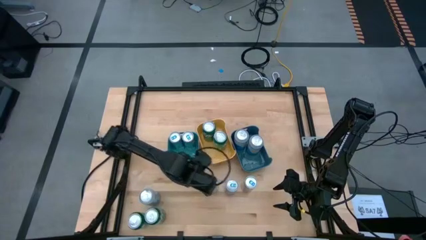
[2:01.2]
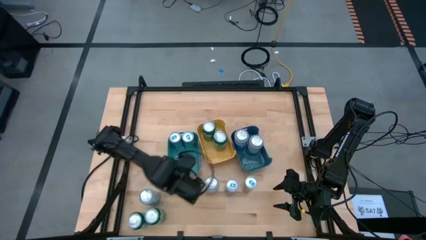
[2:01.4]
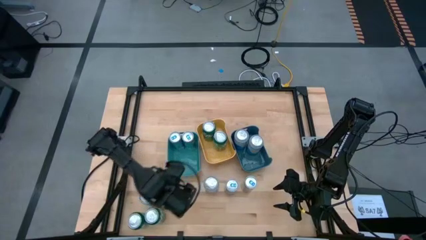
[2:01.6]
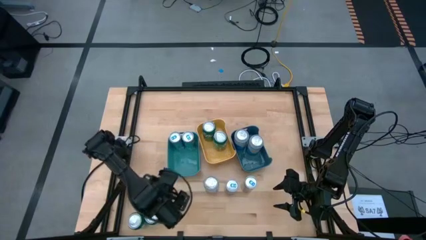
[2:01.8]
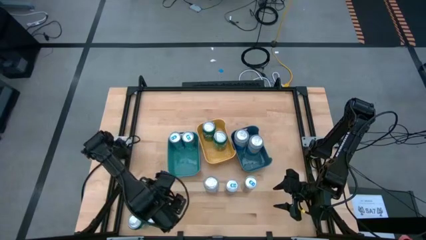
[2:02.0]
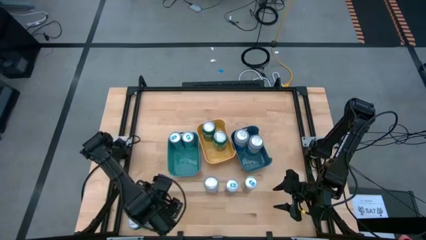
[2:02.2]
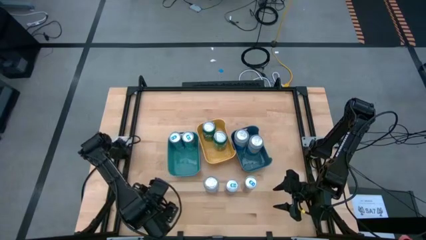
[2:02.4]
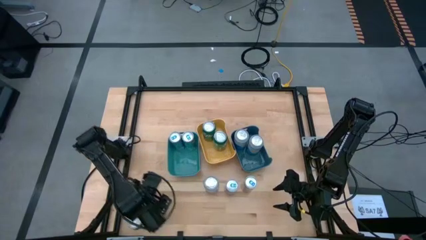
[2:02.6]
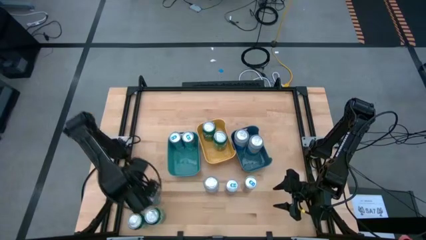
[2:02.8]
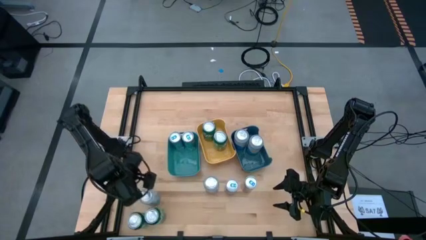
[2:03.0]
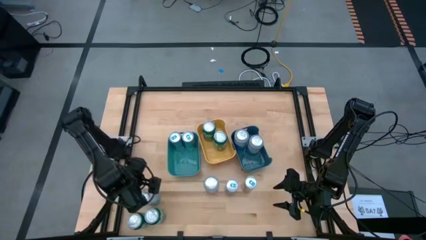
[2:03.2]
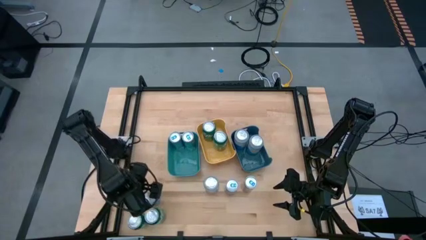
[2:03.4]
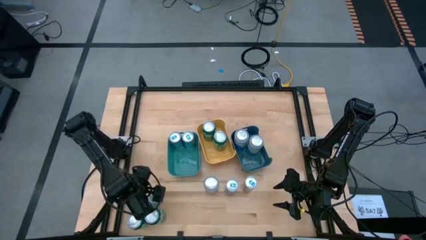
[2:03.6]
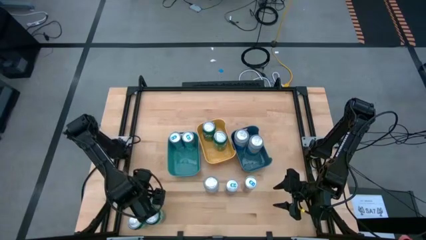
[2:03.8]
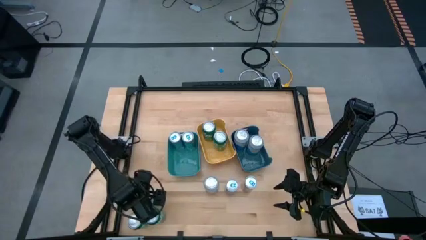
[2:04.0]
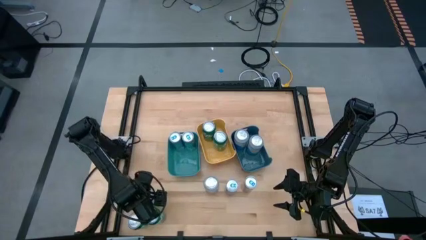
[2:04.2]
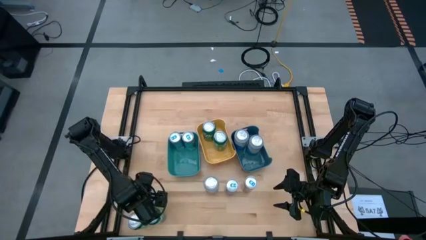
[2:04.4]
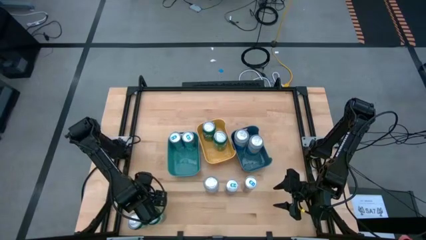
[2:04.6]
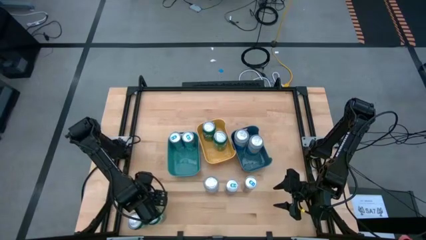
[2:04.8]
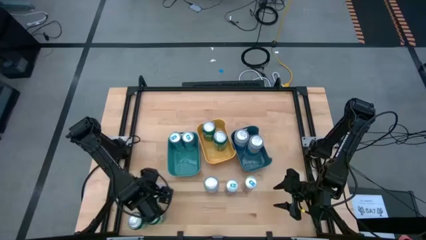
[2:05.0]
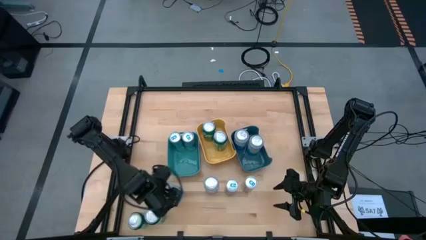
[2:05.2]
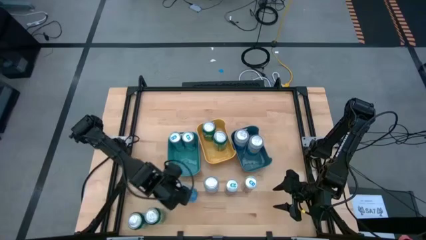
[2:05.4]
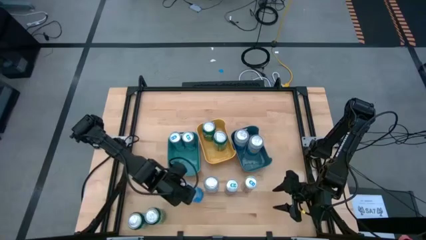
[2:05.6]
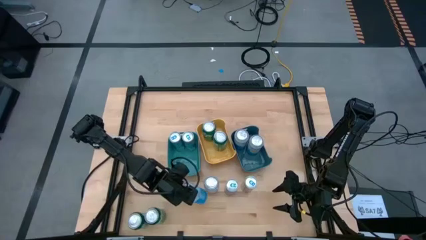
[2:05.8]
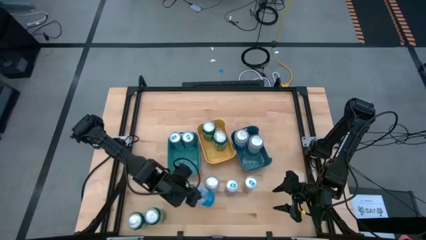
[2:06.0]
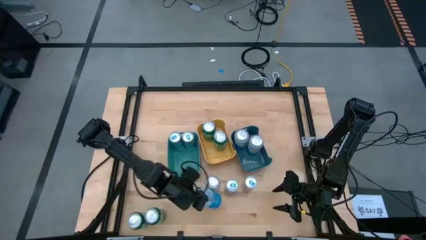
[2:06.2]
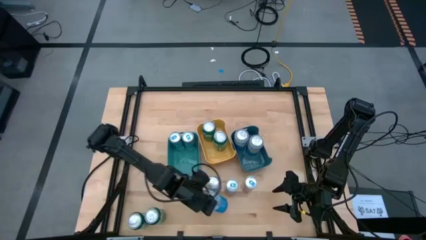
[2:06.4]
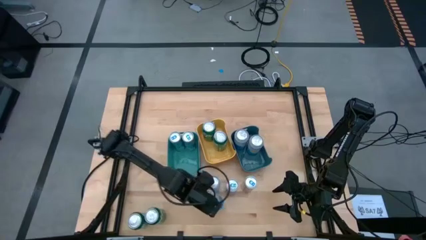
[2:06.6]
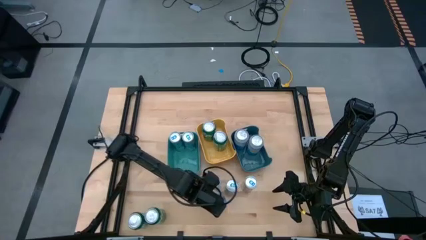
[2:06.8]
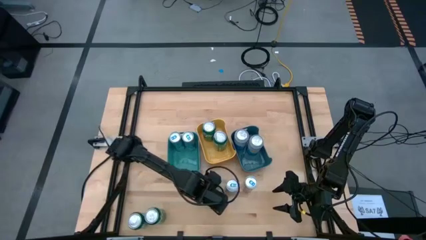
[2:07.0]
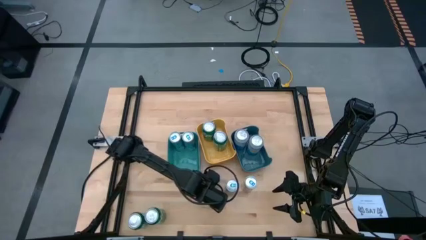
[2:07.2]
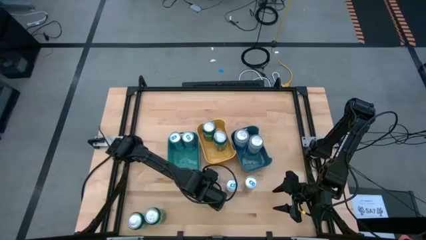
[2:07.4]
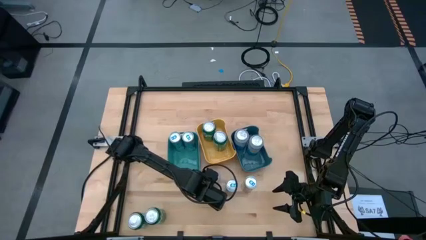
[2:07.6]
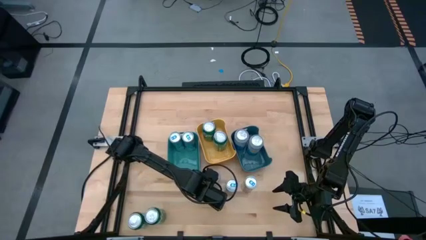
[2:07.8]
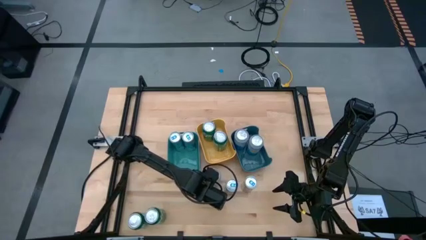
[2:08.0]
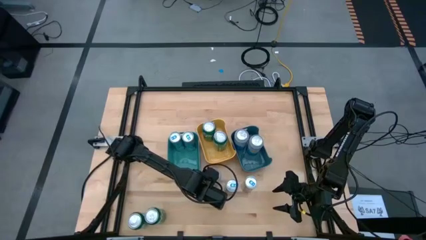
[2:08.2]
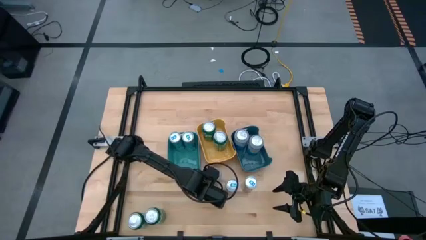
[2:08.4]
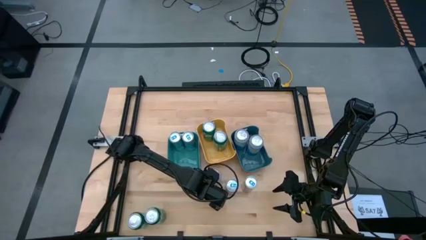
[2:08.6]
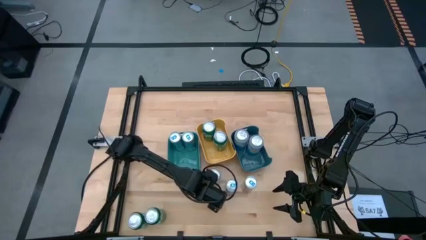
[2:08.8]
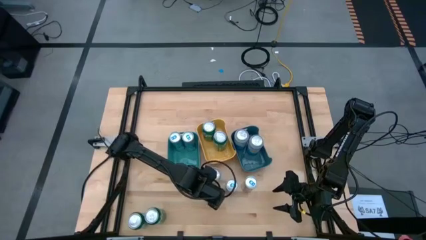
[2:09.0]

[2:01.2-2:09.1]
Task: Sort soda cans
Move the blue and white soda can to the center

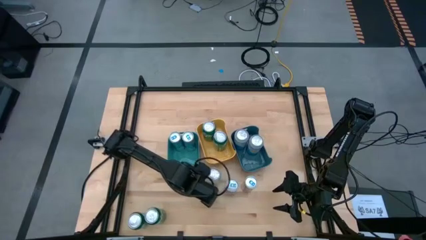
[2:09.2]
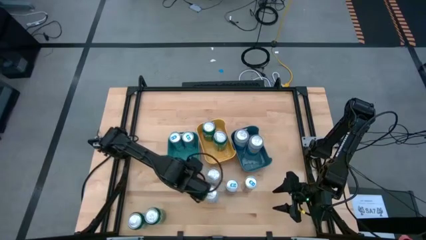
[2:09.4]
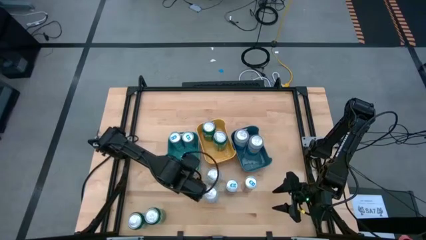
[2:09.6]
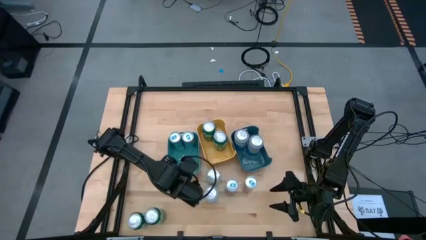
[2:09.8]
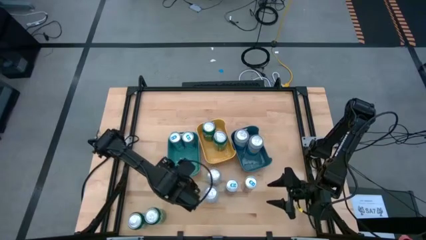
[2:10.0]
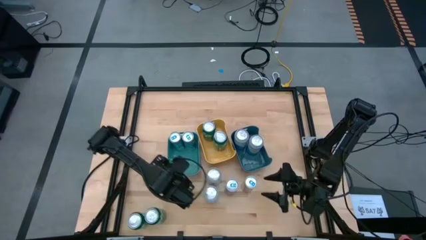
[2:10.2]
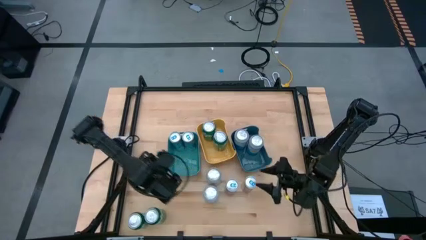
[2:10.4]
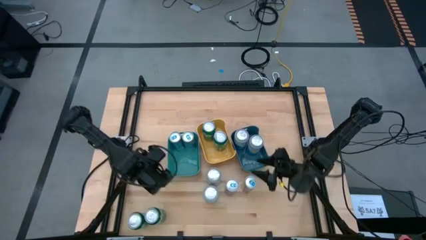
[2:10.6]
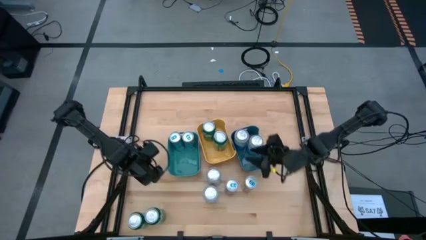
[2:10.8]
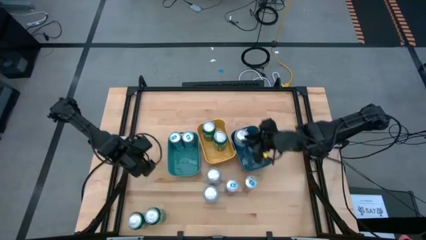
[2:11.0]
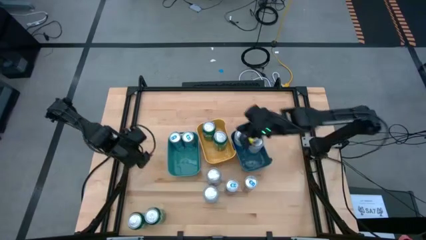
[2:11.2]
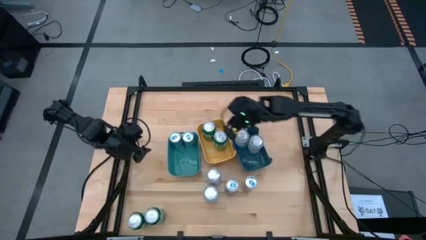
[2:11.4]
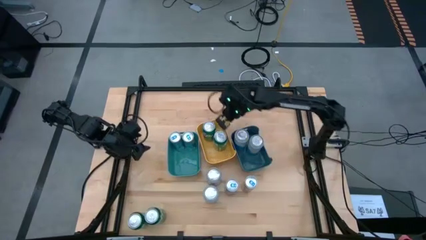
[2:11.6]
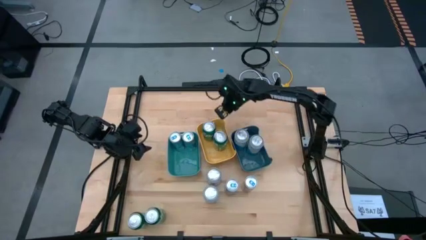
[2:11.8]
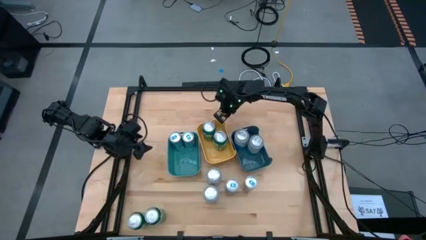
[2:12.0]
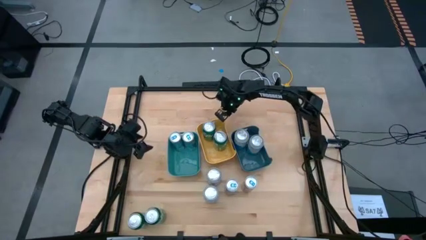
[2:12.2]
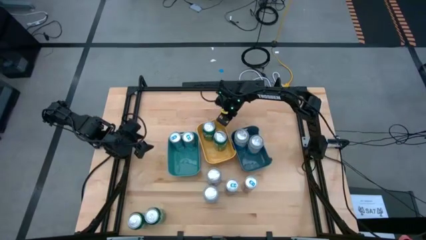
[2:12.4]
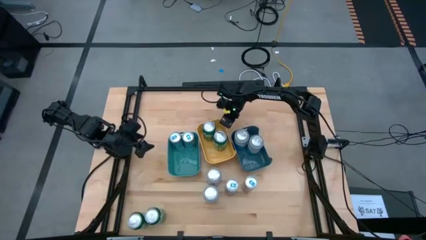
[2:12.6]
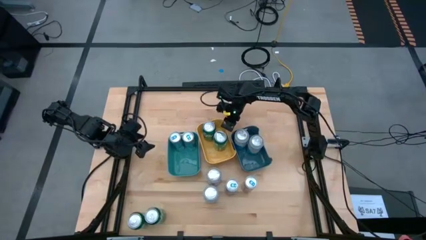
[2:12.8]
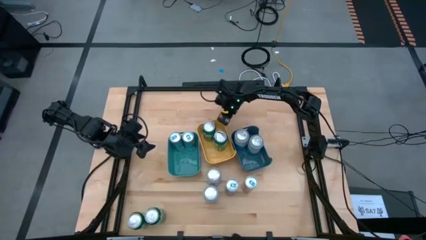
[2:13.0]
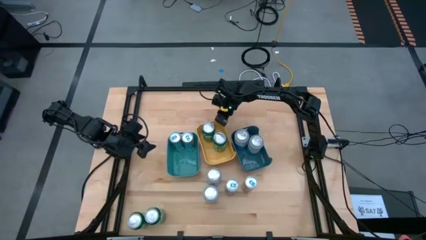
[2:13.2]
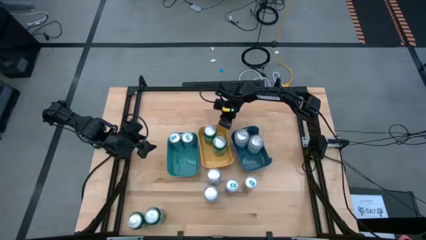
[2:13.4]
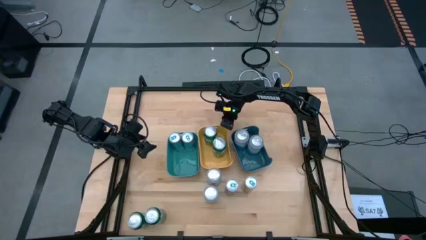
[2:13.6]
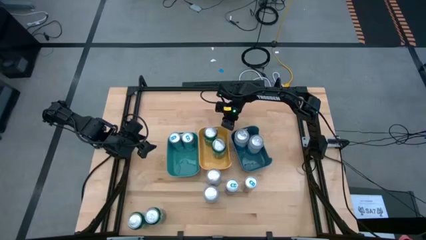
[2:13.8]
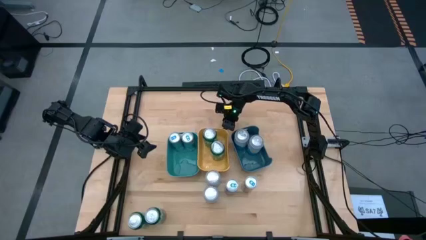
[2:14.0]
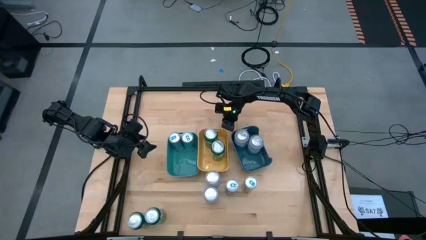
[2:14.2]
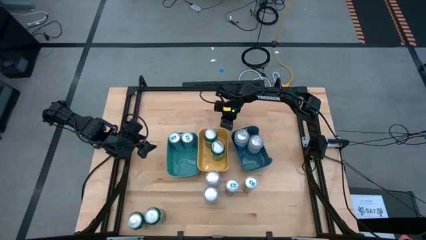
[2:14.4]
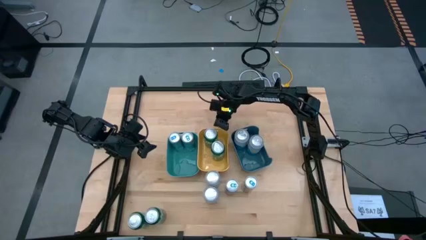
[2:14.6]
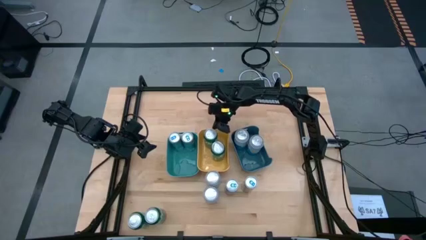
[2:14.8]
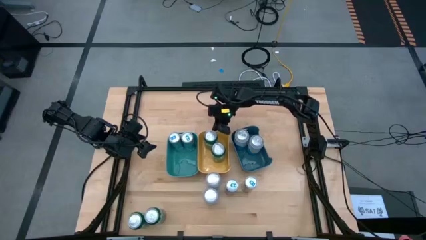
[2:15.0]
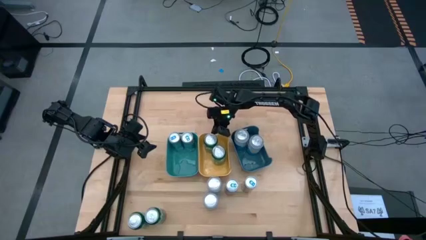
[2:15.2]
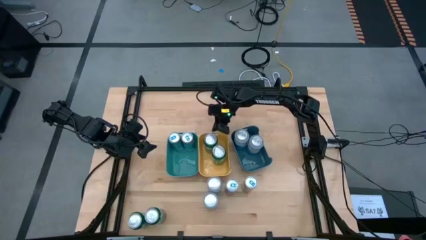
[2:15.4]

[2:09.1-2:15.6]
Adjust the yellow bin

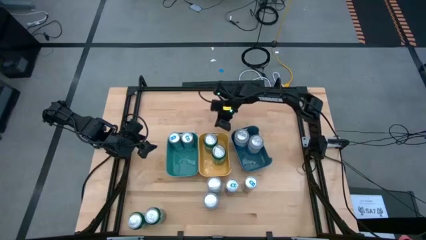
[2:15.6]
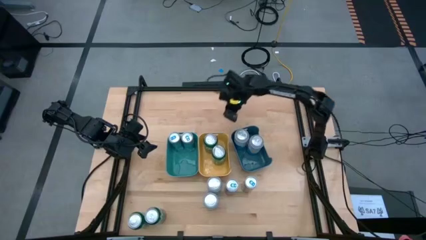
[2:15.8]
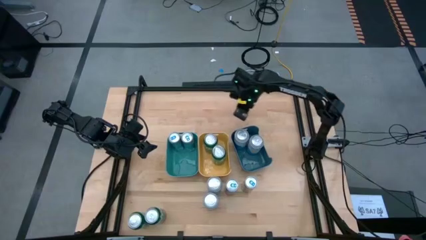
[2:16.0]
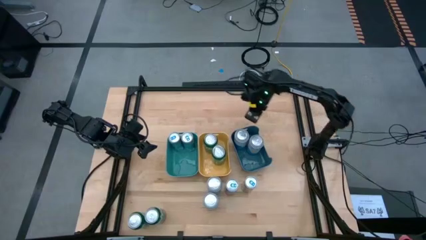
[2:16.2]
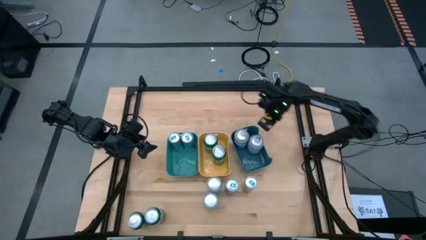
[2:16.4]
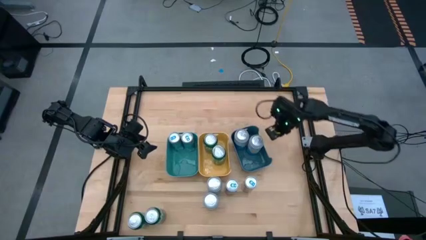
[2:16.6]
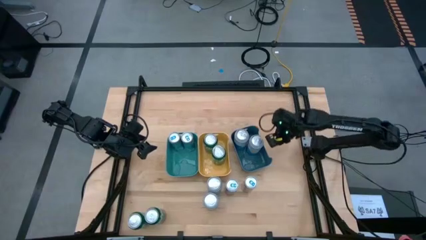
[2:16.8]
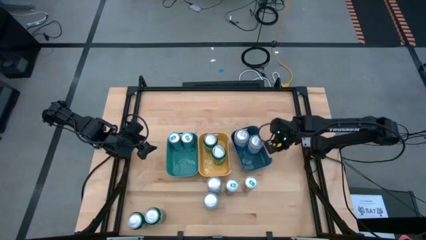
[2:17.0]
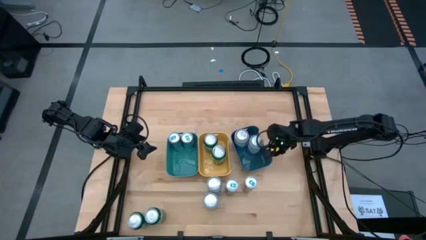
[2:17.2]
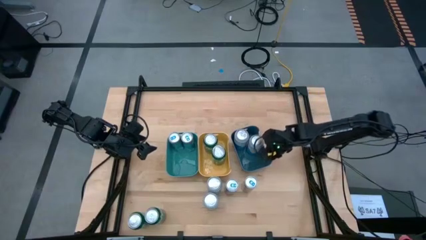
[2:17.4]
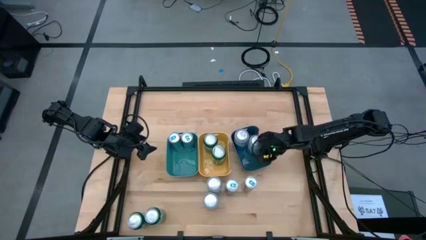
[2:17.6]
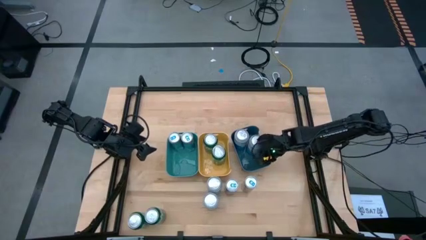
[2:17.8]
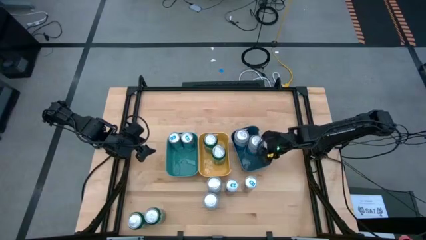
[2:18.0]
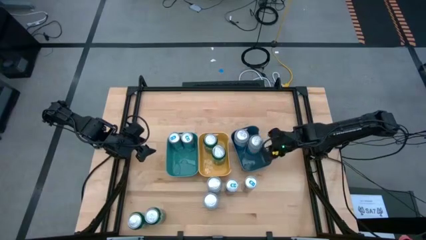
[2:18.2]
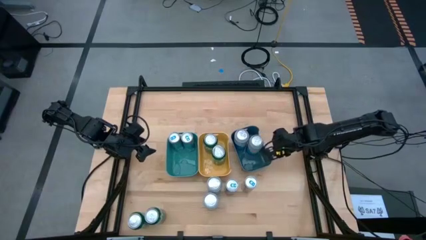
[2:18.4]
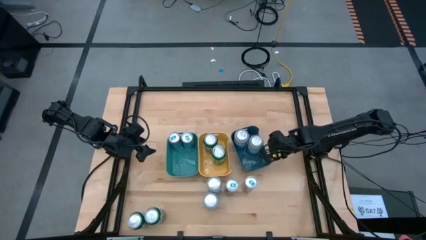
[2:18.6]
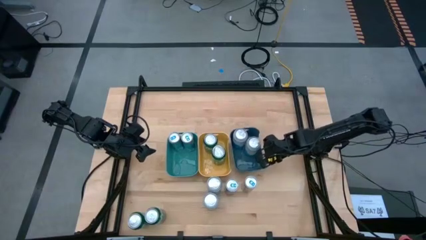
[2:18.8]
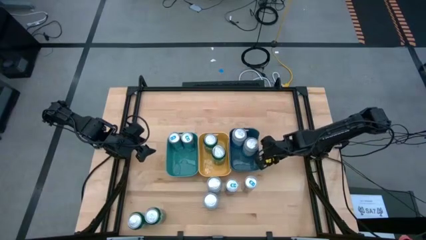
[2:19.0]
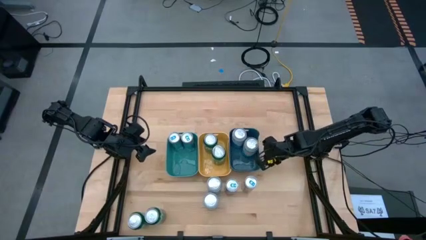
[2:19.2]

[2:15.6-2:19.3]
Adjust the dark blue bin
